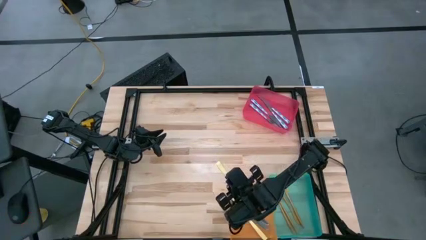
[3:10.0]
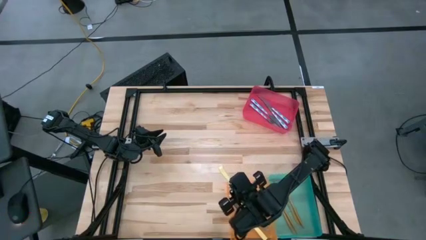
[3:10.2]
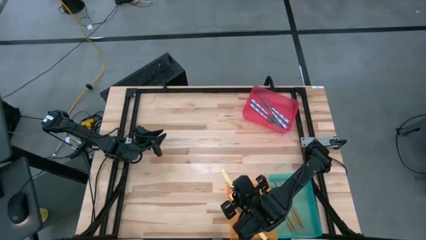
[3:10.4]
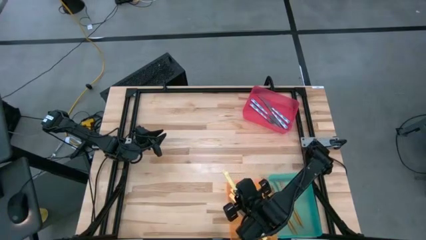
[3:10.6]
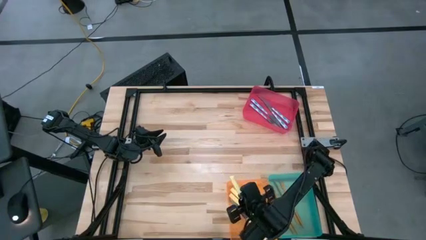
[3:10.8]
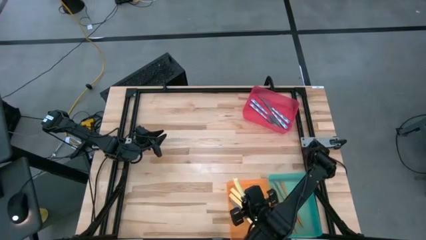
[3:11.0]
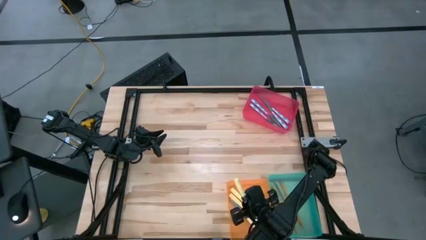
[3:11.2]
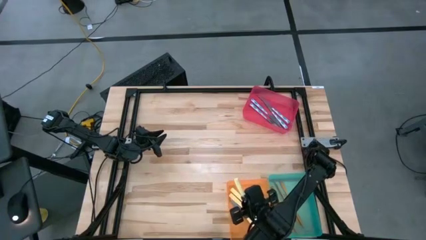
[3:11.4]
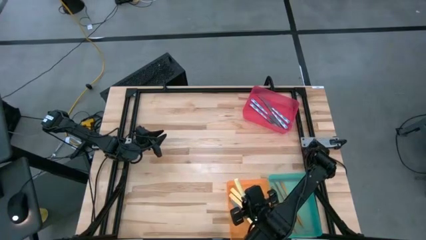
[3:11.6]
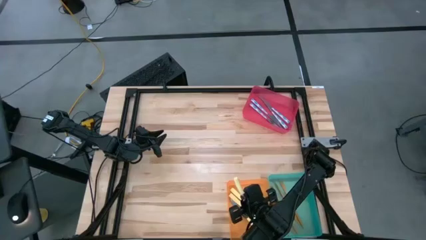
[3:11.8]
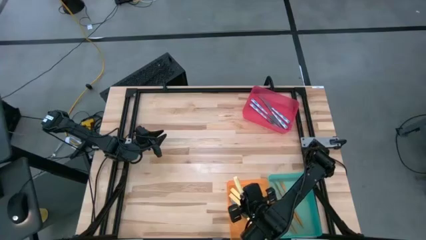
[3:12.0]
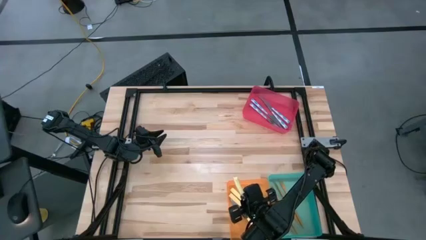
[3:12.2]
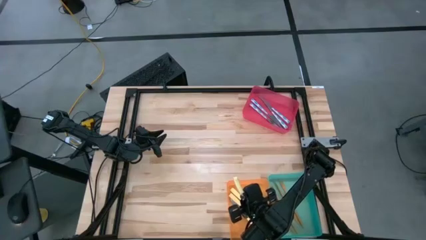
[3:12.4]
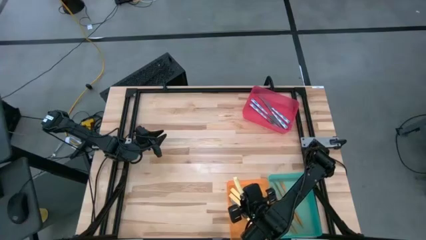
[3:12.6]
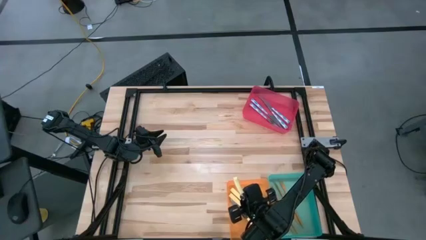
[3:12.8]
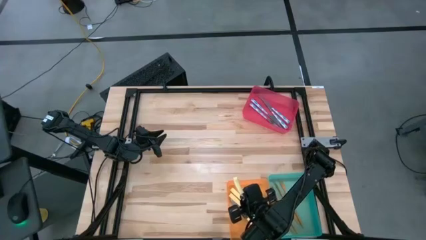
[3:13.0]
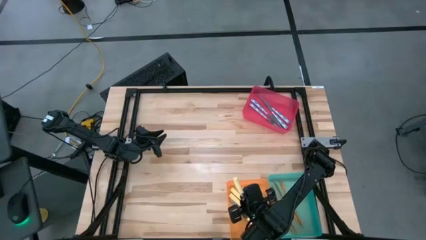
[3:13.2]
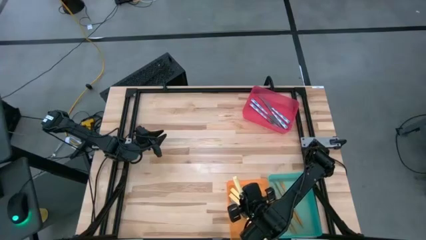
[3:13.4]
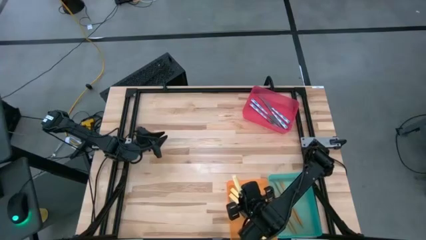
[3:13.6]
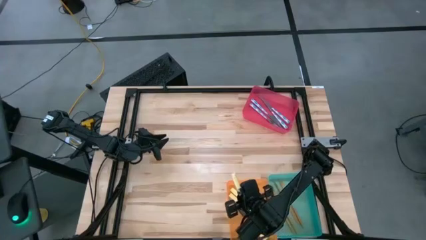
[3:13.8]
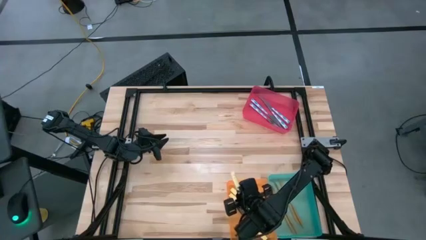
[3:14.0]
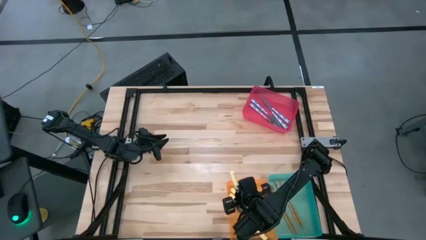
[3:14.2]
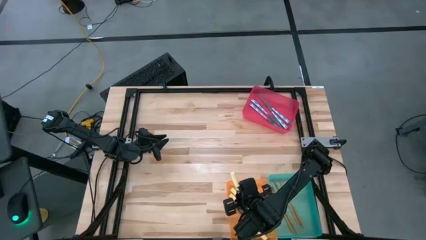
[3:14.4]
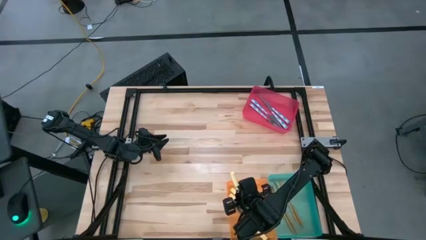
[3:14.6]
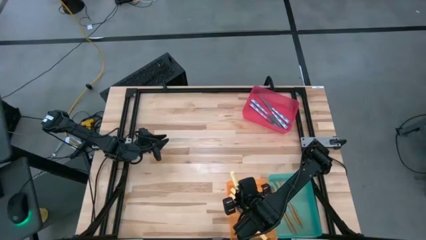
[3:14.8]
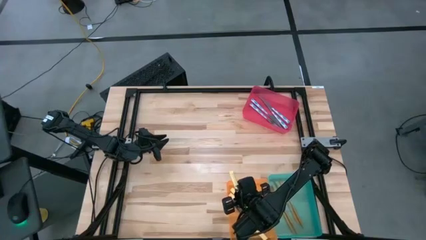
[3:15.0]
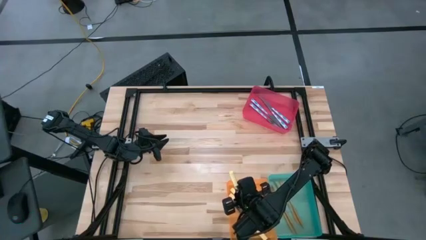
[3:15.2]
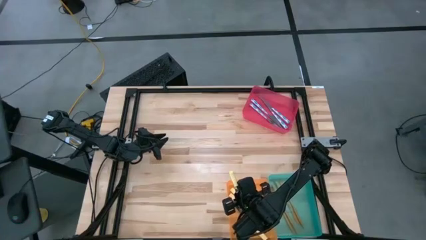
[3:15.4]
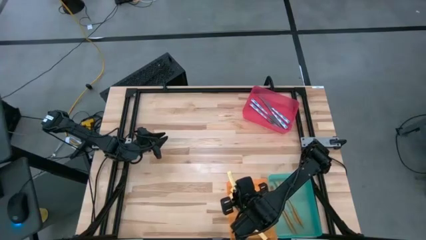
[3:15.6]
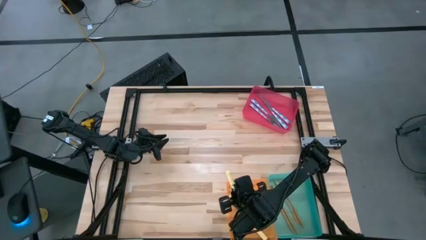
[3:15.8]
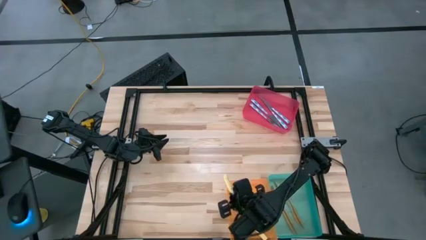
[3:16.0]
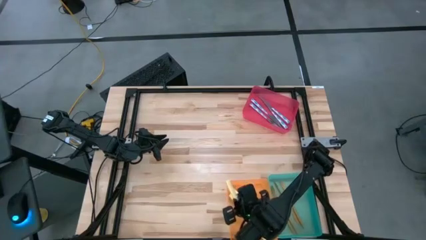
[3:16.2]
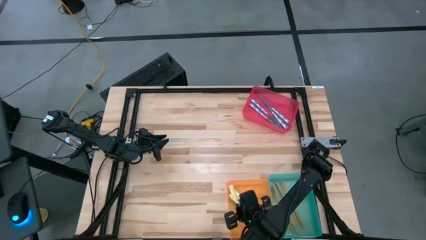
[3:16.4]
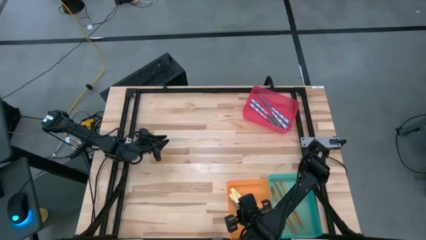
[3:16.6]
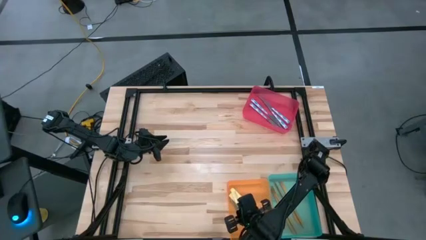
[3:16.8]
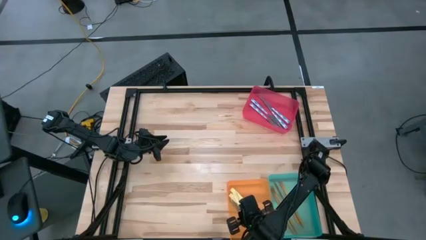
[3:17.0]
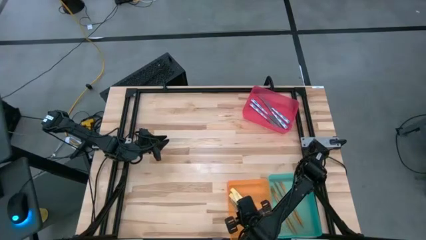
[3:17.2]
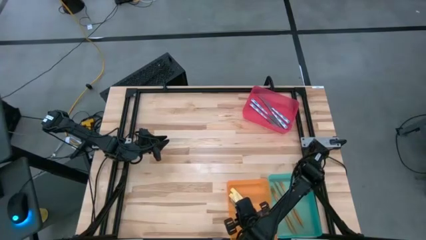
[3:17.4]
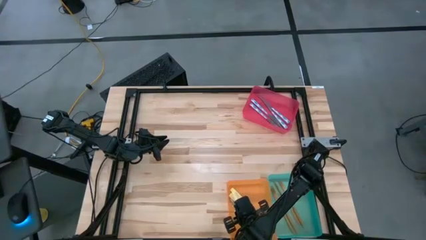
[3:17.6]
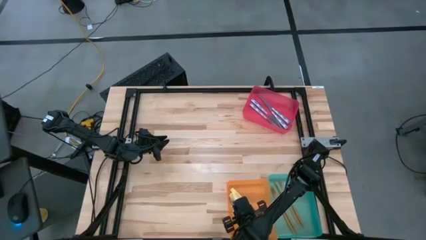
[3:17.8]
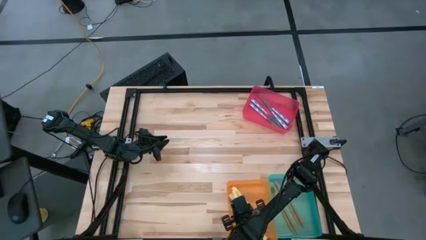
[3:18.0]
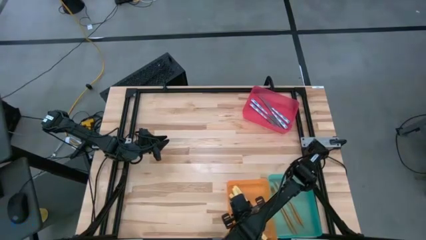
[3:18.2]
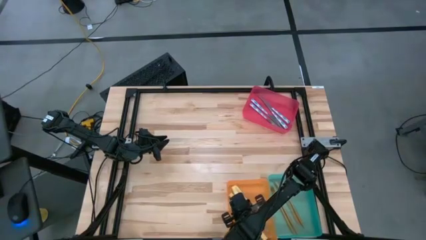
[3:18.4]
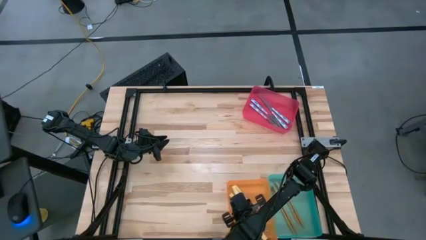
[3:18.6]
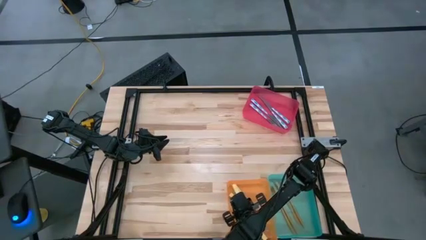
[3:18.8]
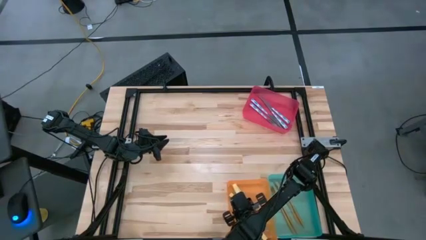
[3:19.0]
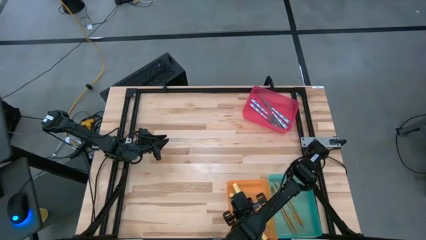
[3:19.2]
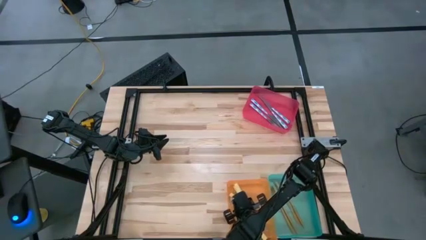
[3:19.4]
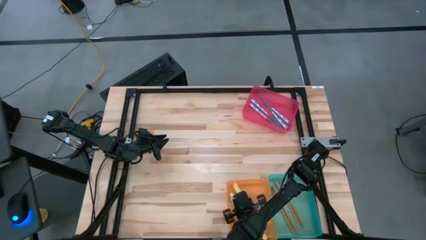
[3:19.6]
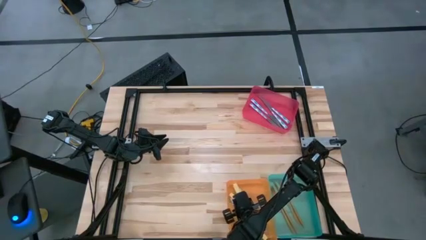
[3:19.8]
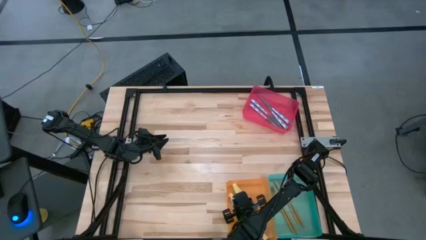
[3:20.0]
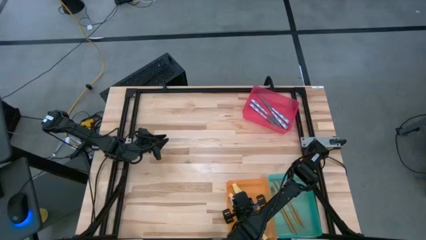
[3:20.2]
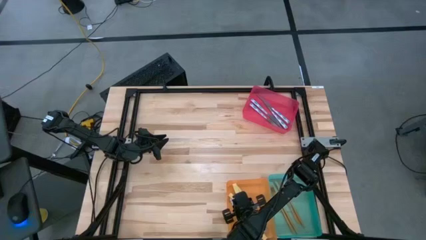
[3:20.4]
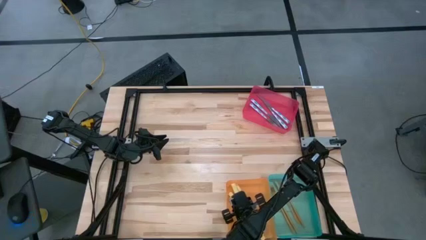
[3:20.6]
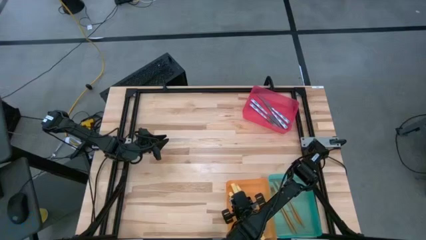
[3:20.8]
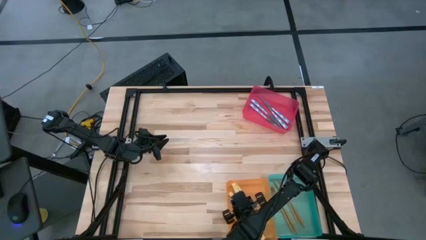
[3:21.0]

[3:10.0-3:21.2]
Task: Sort silverware by color (type)
Put the yellow knife into the orange bin

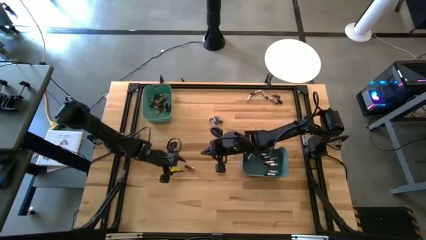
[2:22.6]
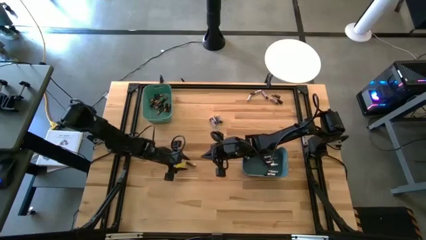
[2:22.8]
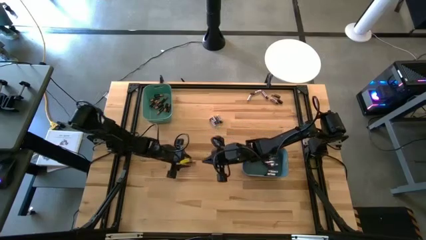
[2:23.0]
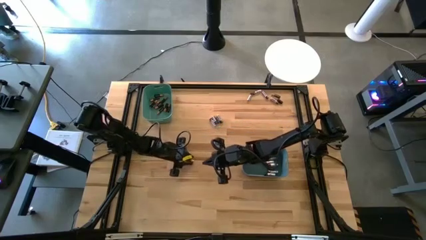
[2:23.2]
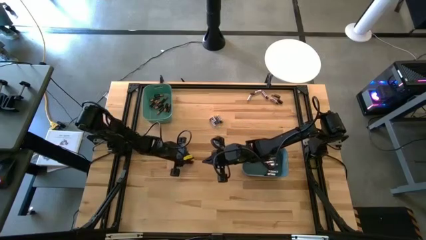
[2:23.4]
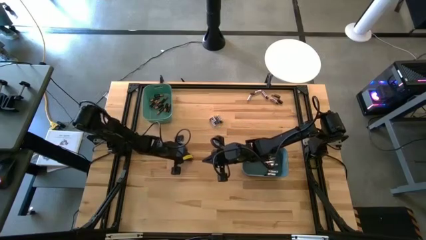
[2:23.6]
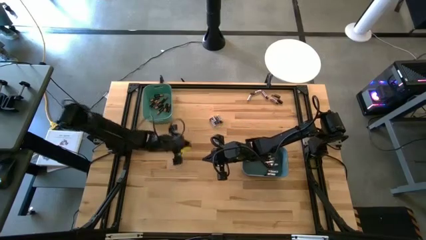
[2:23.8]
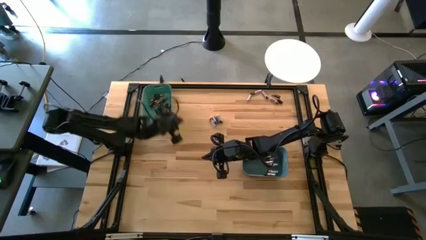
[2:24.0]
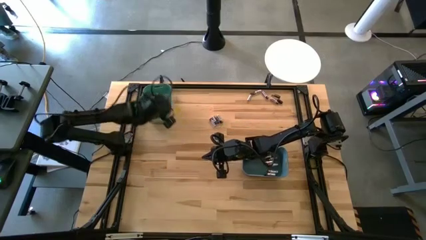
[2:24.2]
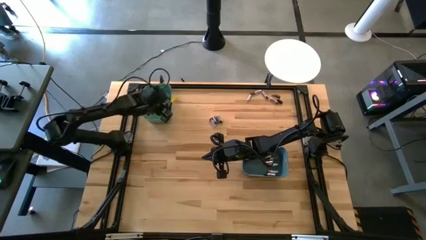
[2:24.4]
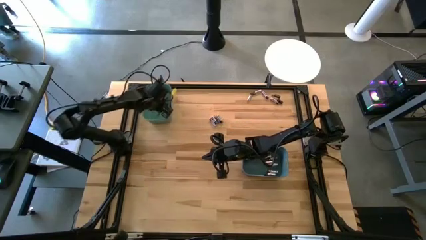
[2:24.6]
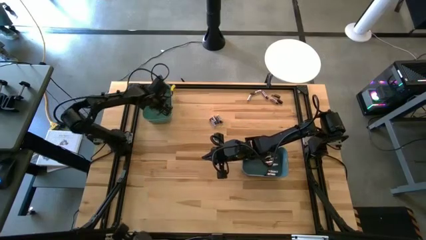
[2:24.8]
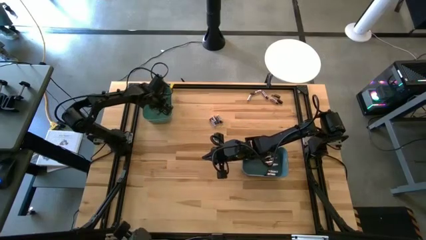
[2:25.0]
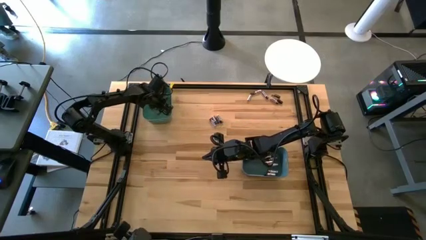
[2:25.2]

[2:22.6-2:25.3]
Task: Sort batteries
Put the black battery into the green bin

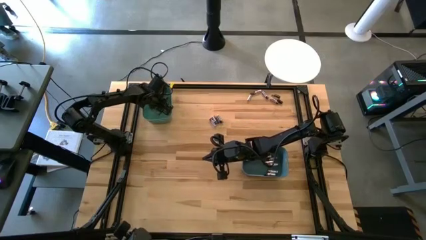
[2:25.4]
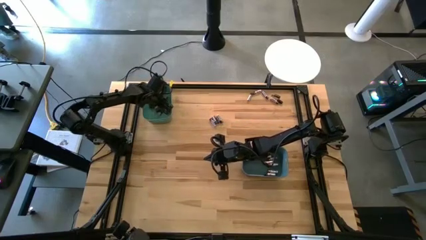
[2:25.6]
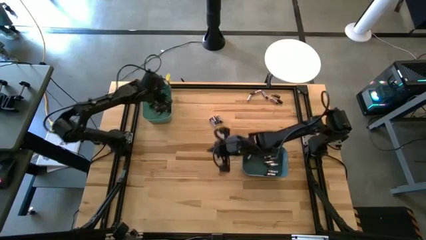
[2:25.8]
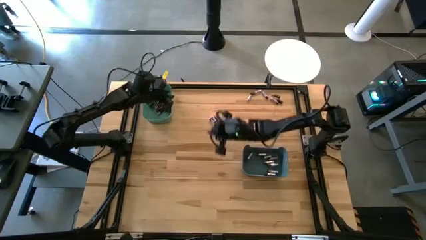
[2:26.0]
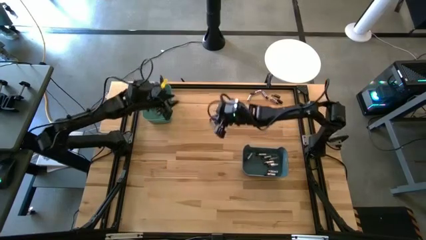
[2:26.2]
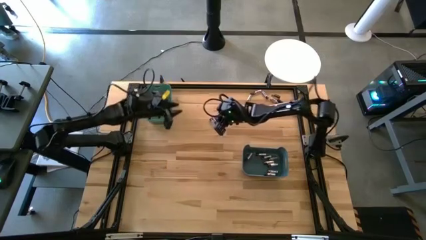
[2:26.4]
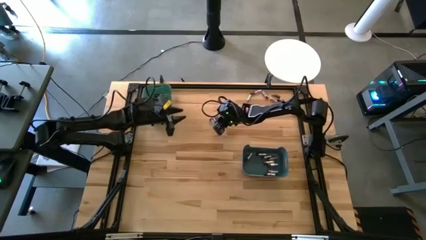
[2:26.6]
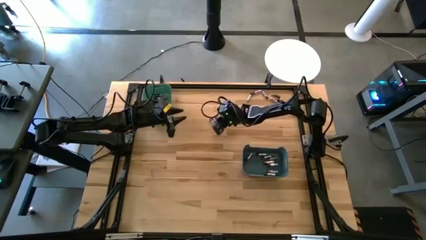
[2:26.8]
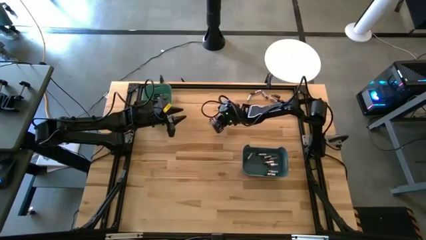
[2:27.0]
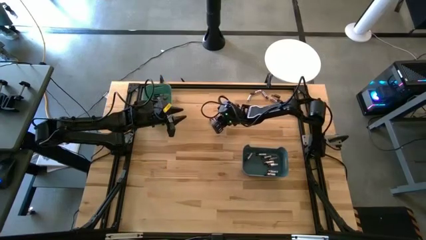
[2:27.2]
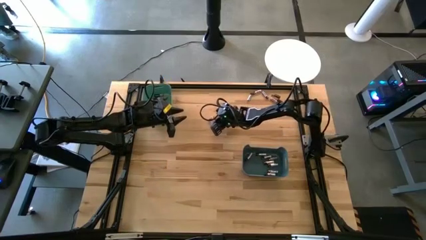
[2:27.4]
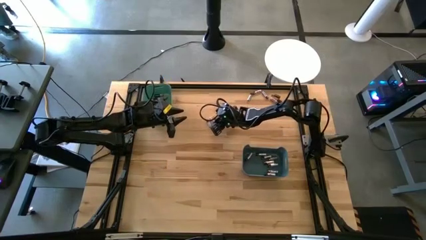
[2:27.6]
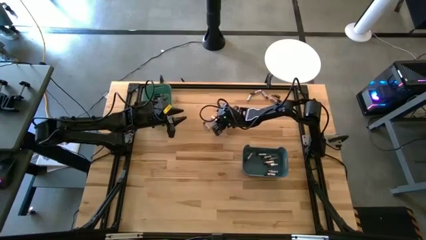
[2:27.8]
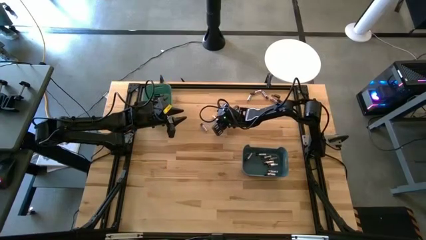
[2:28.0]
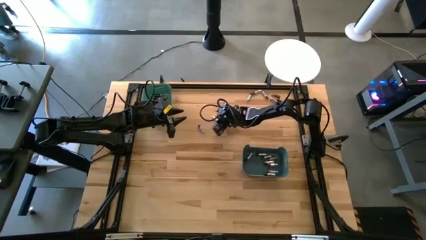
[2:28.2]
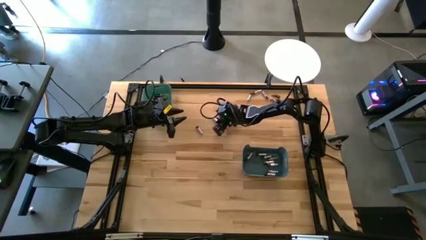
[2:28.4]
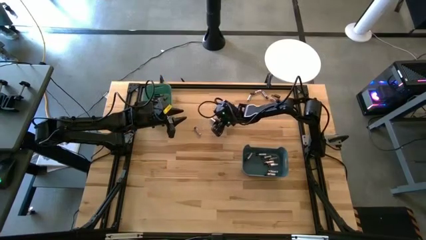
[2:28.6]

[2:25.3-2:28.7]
Put the black battery into the green bin
